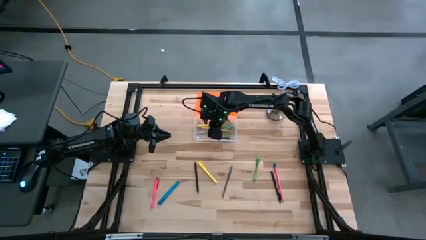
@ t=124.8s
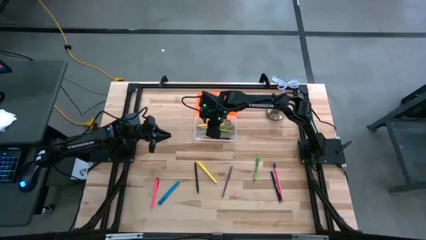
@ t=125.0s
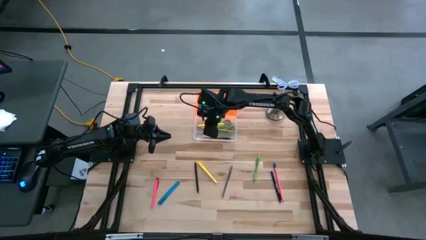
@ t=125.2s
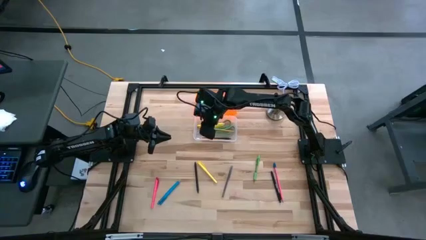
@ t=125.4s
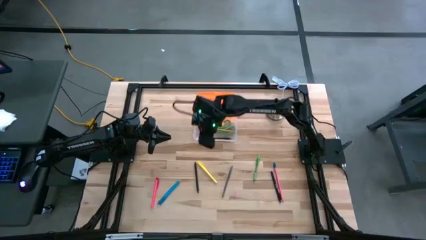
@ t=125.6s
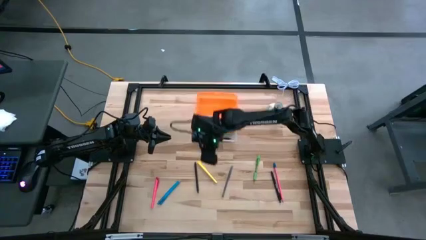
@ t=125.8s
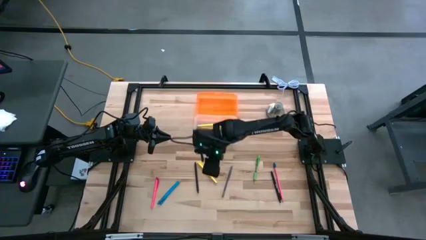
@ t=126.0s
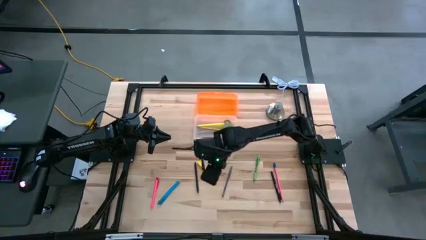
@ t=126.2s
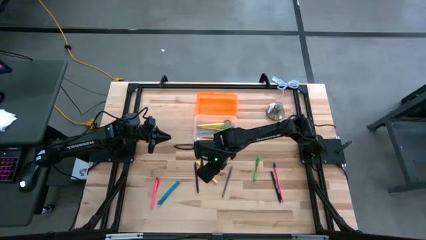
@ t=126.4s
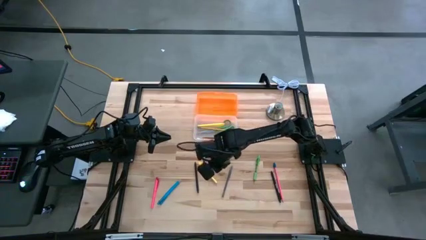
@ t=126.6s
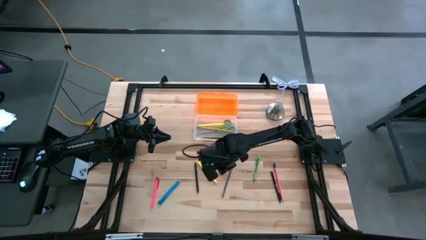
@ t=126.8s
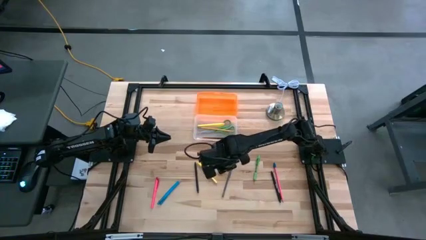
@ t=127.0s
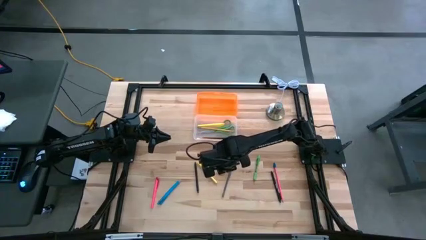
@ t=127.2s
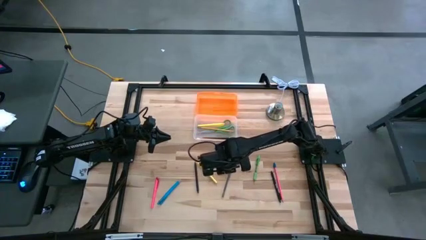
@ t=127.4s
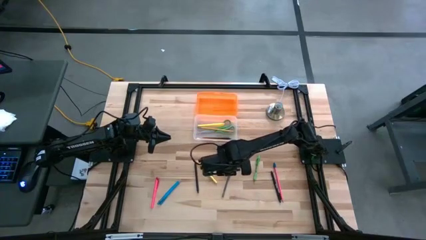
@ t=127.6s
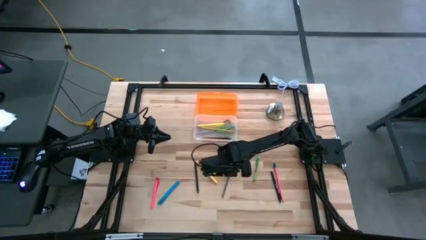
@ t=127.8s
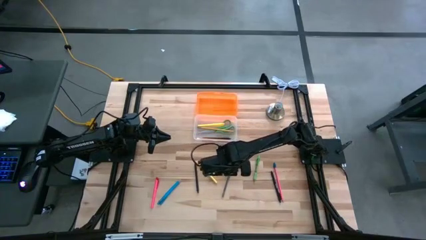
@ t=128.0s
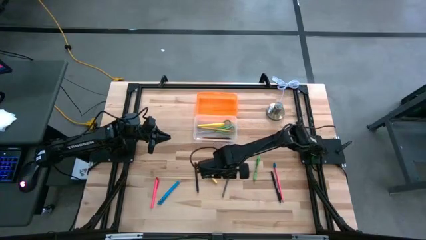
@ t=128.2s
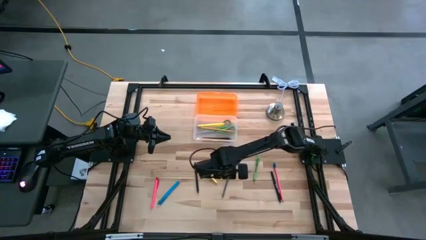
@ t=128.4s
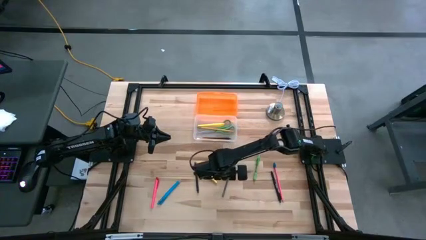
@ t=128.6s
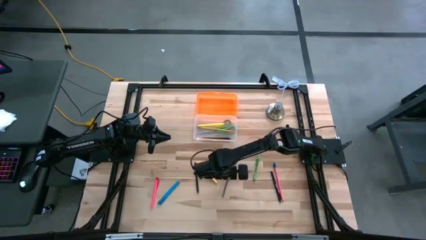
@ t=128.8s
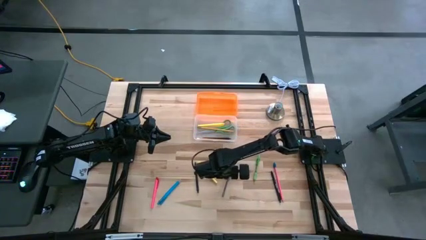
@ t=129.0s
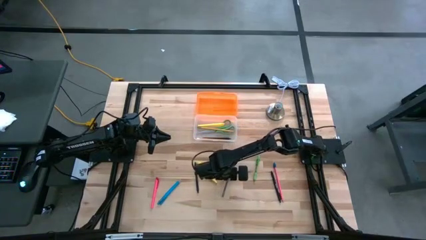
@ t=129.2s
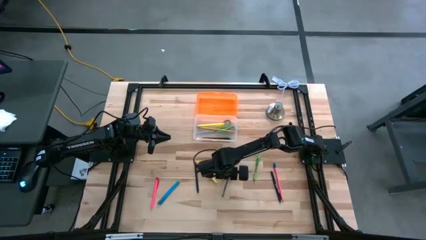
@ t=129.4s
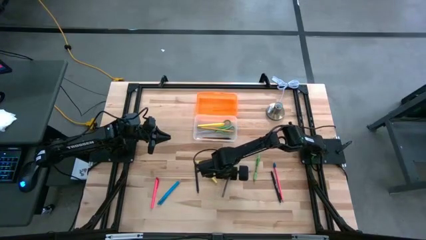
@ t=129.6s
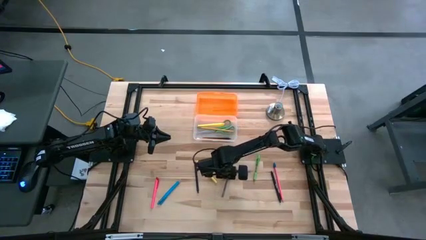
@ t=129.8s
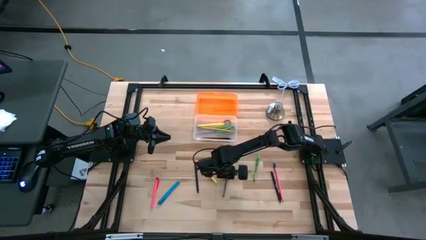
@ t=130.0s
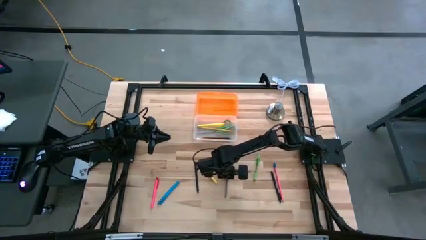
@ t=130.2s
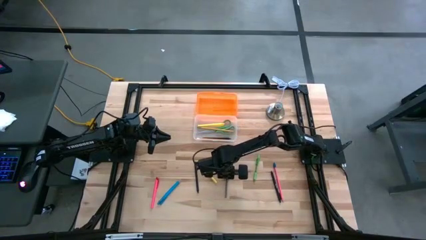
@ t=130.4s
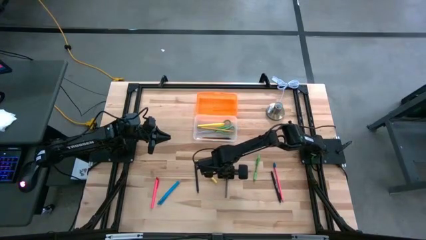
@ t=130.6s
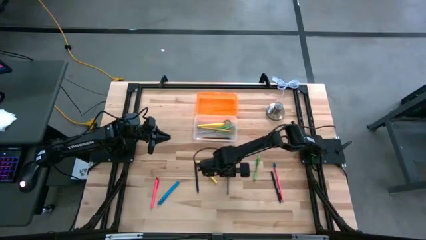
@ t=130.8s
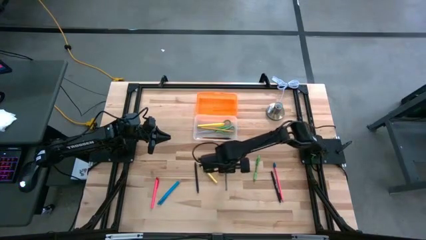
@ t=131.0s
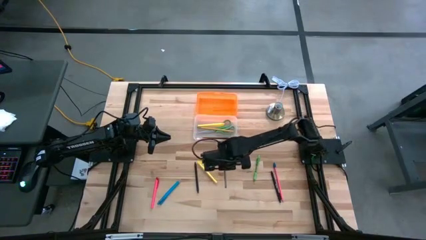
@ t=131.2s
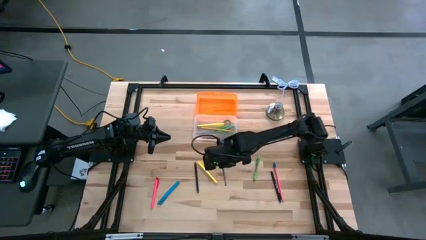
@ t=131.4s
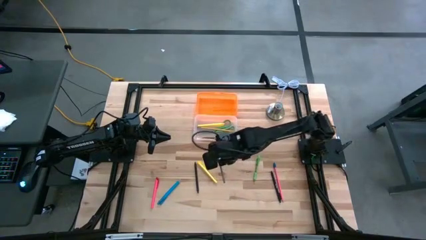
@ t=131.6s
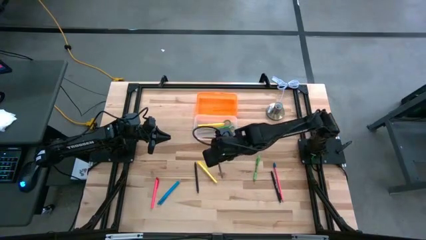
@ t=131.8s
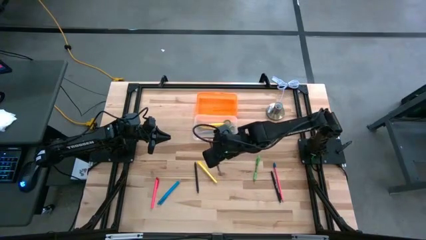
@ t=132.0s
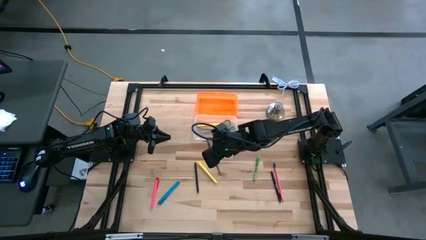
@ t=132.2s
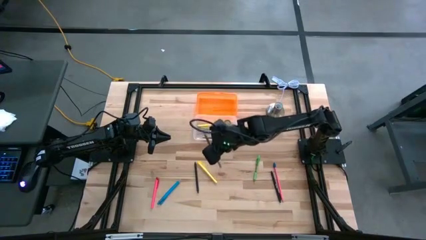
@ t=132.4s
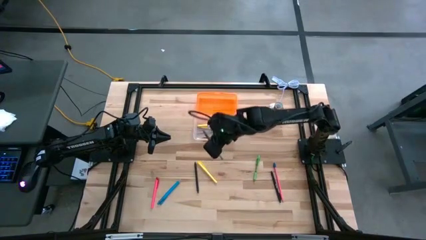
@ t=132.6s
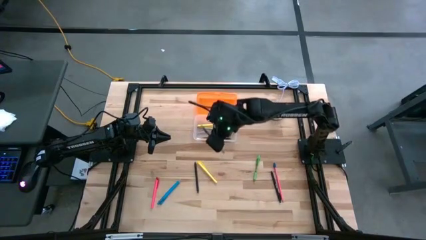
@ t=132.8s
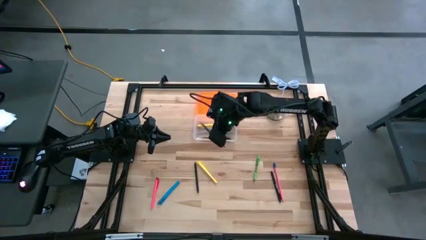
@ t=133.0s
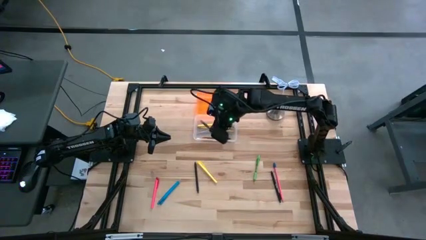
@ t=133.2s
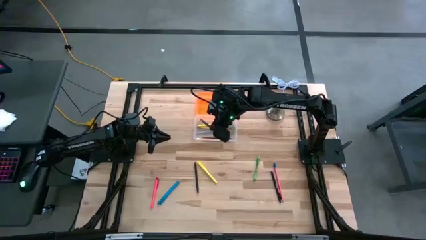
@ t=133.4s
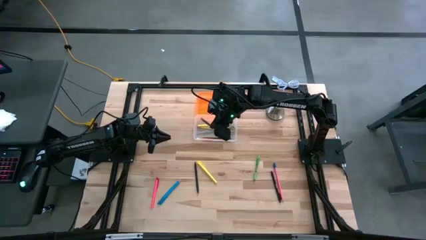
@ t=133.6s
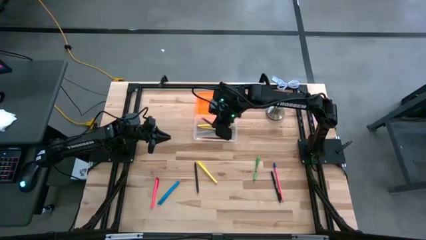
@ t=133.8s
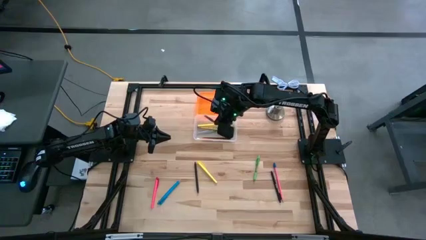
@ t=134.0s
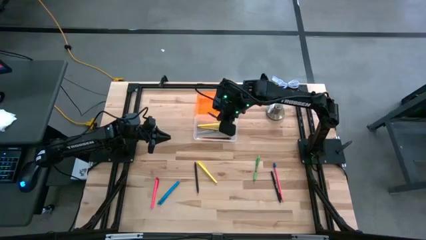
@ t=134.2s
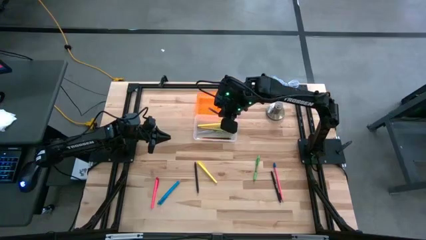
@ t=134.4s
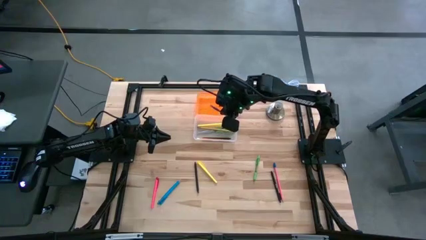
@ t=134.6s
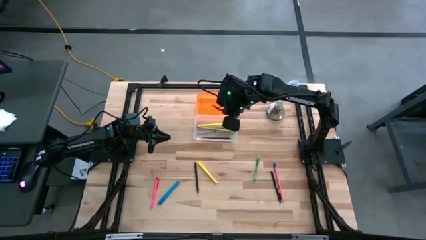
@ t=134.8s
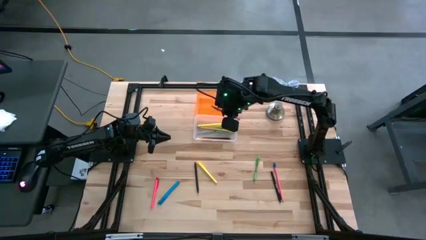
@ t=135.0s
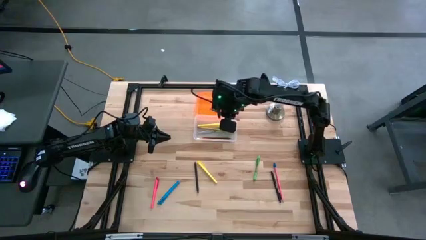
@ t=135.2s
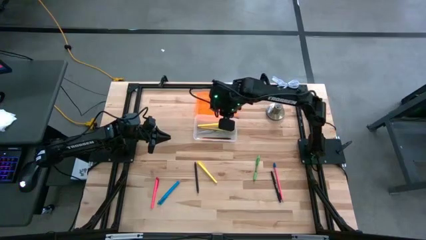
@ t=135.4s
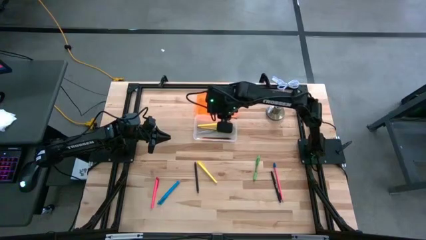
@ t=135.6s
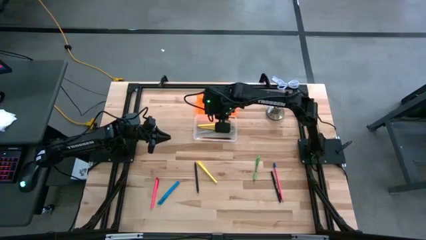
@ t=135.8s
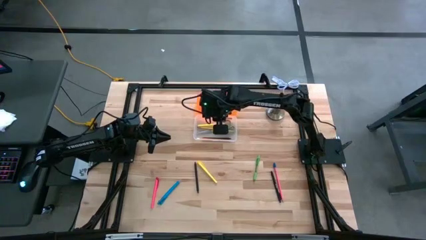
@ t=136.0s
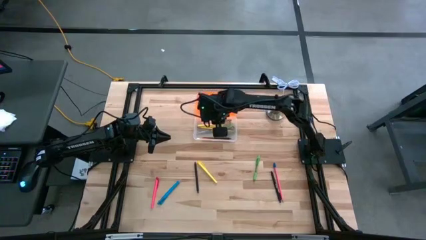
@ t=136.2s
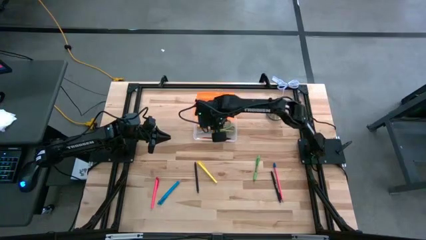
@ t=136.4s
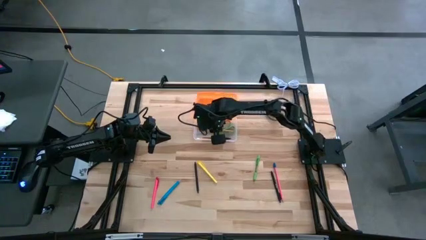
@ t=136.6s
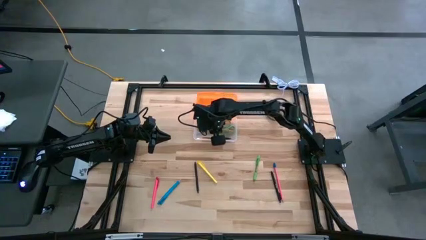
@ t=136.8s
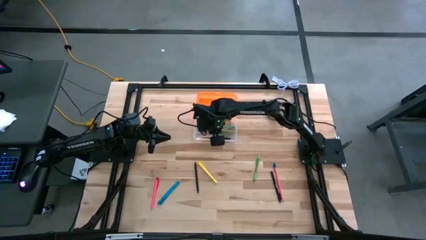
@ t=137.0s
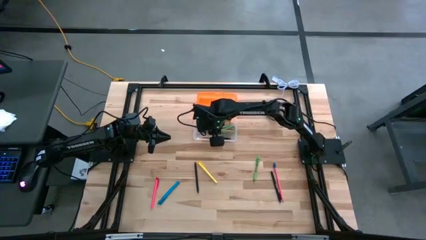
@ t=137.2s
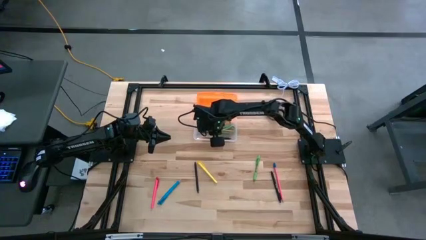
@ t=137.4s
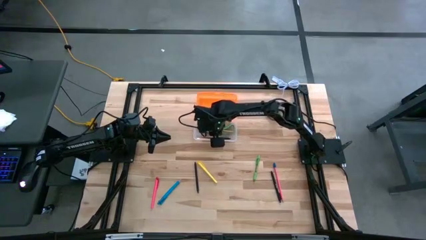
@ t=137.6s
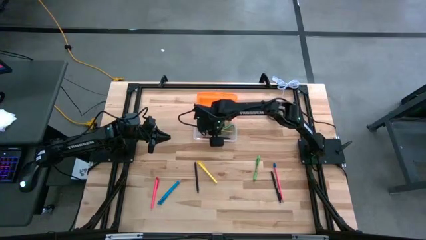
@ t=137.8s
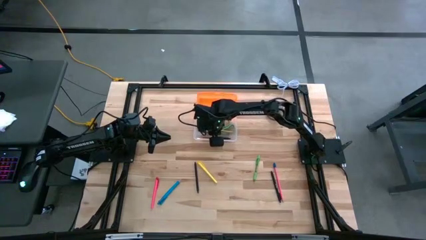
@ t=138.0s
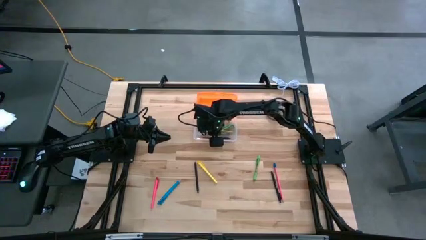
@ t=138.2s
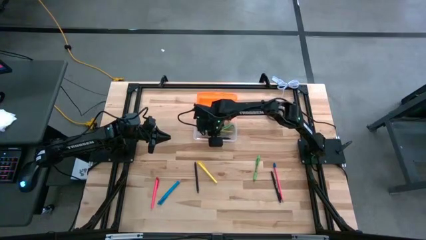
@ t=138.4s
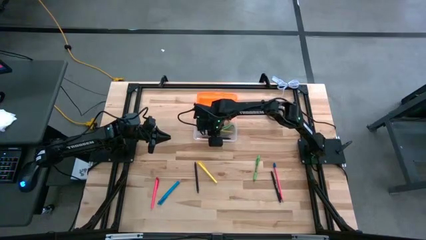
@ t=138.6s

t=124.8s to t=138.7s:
Task: Pick & place school supplies into a supply box
Put the gray pen into the orange supply box

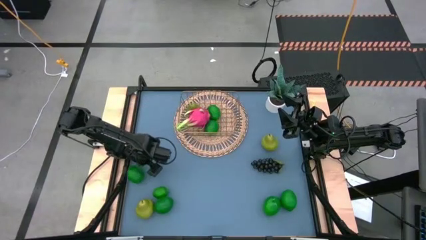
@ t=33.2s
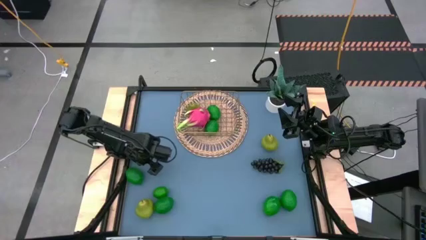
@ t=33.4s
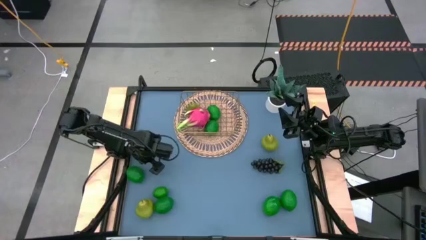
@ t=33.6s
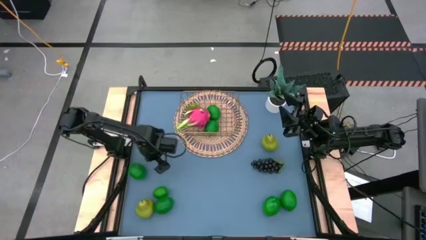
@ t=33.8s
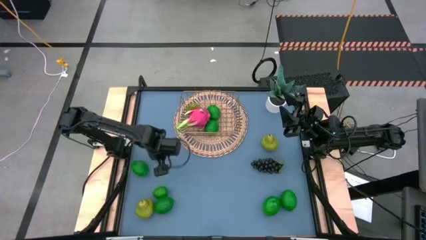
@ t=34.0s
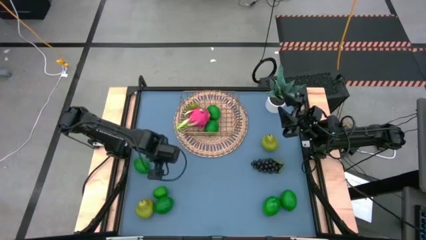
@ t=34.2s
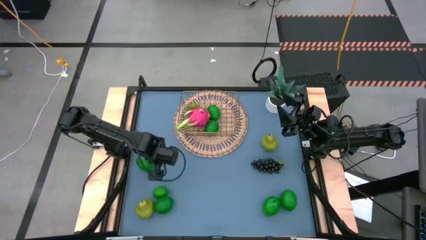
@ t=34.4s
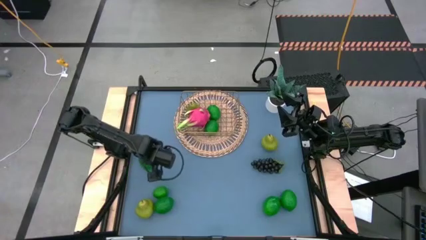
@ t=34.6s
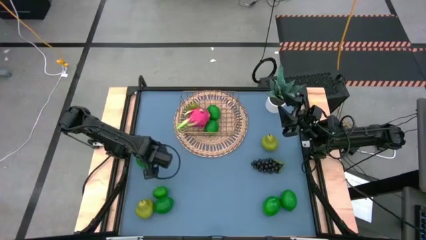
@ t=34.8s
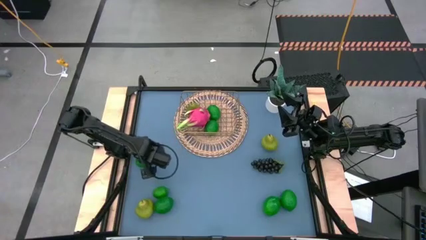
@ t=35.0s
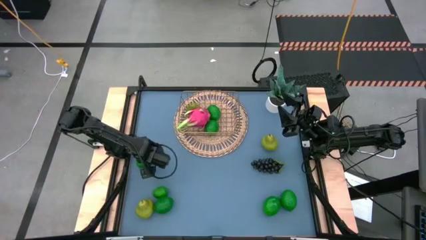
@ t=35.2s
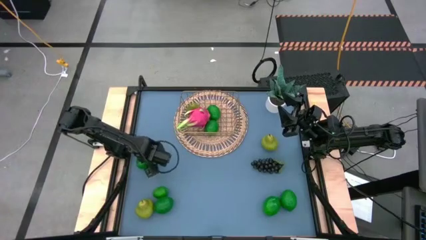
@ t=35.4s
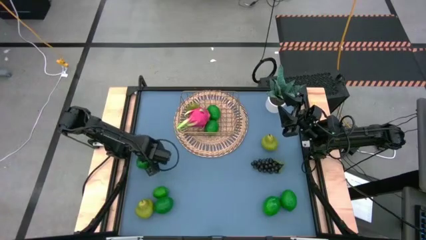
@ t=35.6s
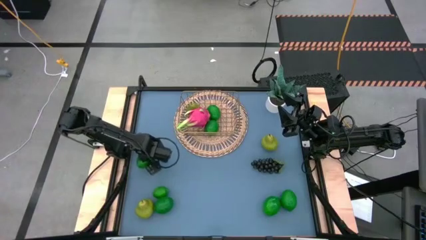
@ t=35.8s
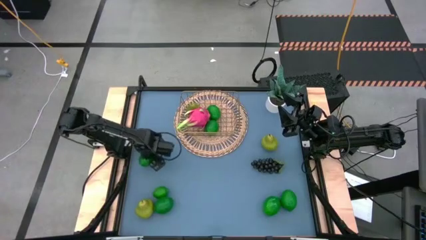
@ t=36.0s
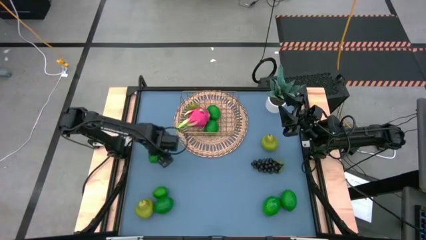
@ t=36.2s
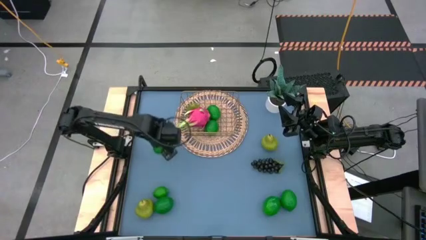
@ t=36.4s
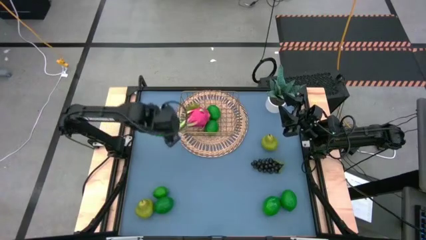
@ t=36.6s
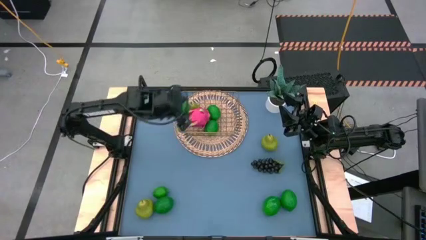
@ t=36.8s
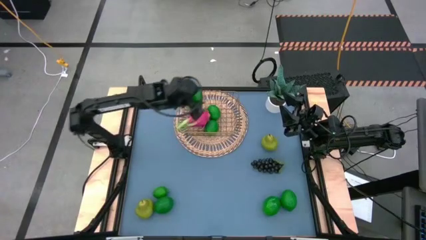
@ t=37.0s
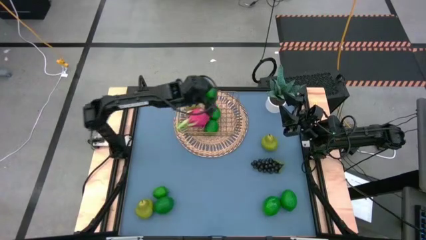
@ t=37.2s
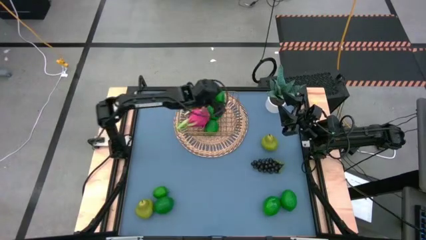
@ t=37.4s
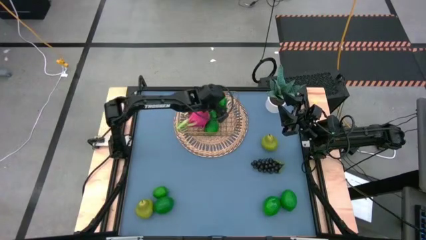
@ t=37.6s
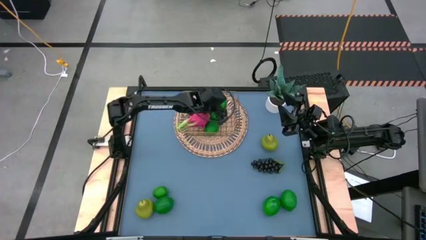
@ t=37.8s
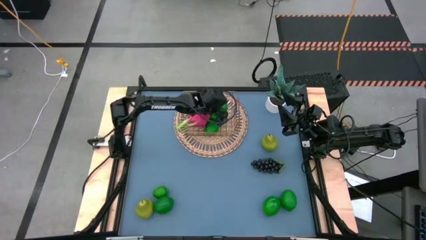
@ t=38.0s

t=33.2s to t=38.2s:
Task: Build produce basket
Put the green lime into the gold wire basket
